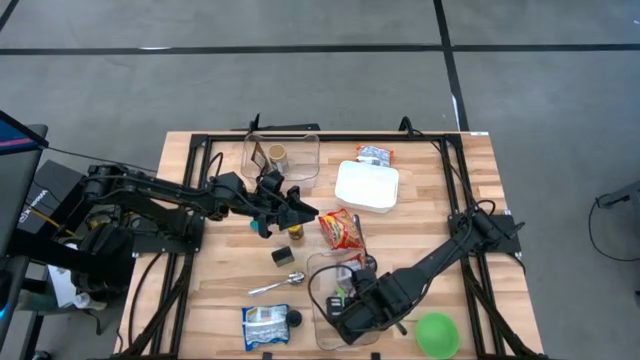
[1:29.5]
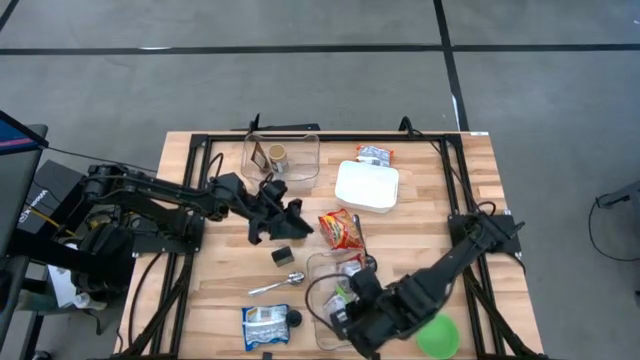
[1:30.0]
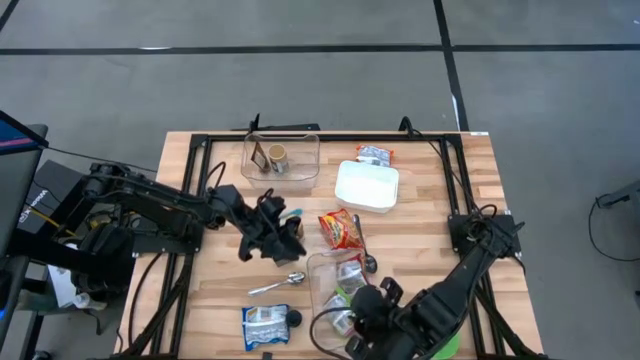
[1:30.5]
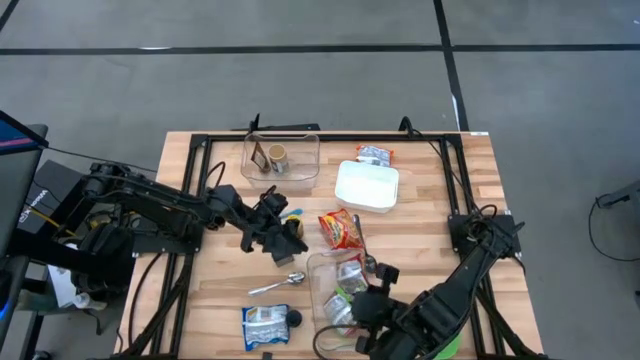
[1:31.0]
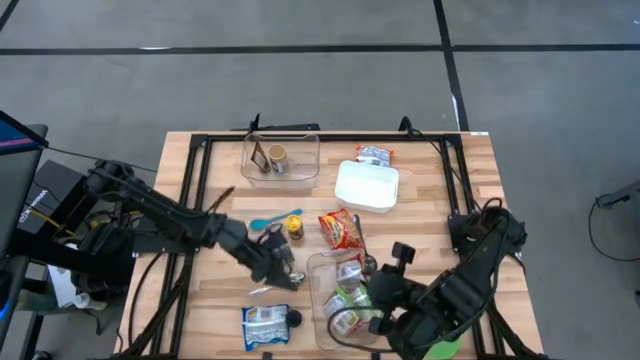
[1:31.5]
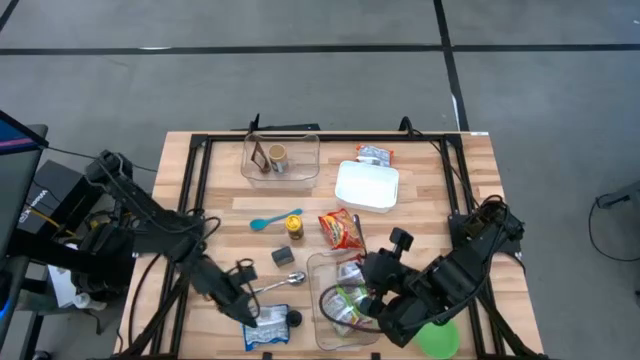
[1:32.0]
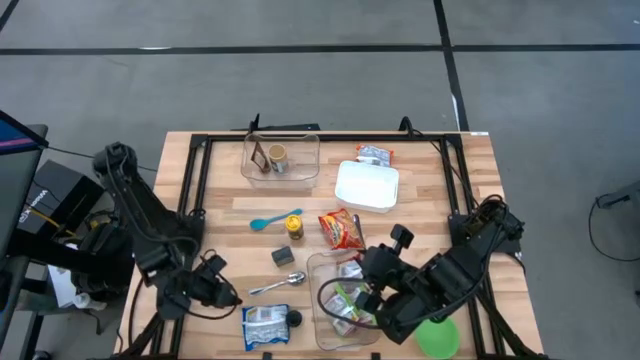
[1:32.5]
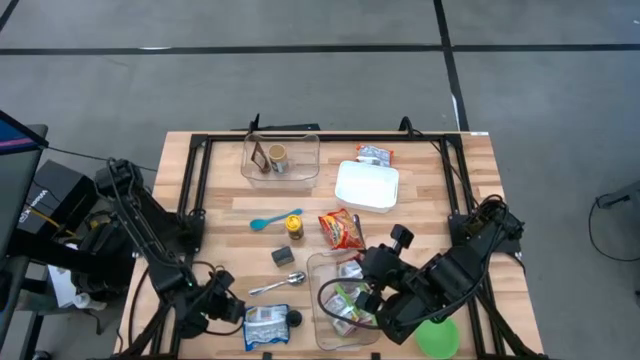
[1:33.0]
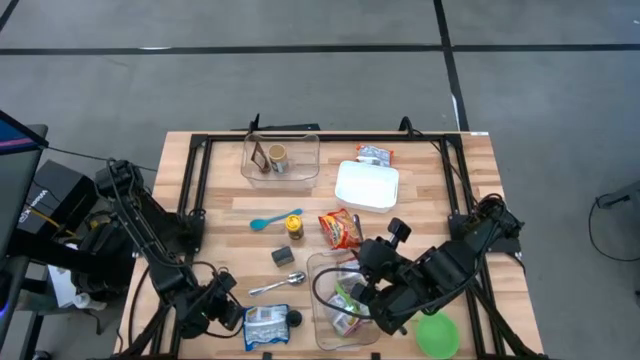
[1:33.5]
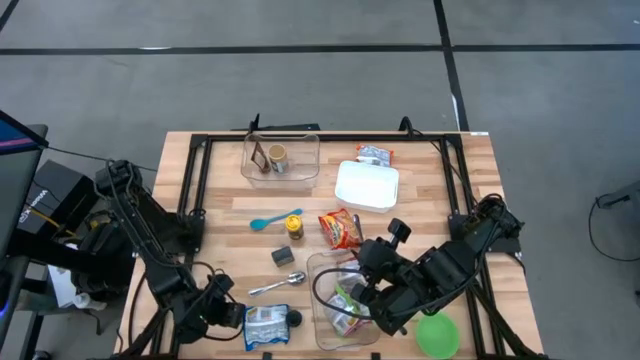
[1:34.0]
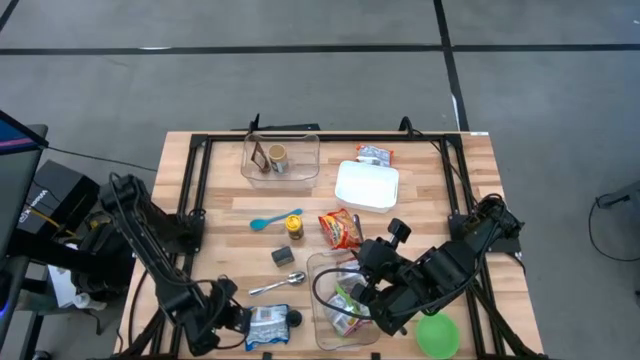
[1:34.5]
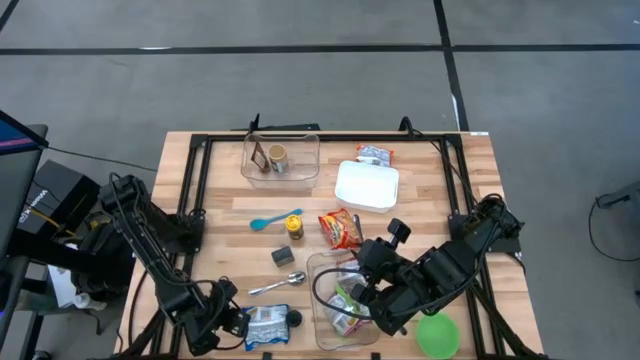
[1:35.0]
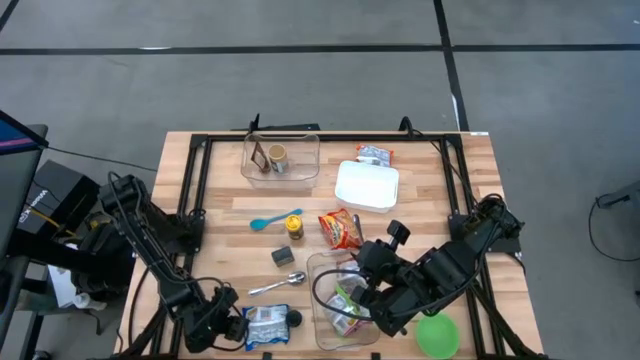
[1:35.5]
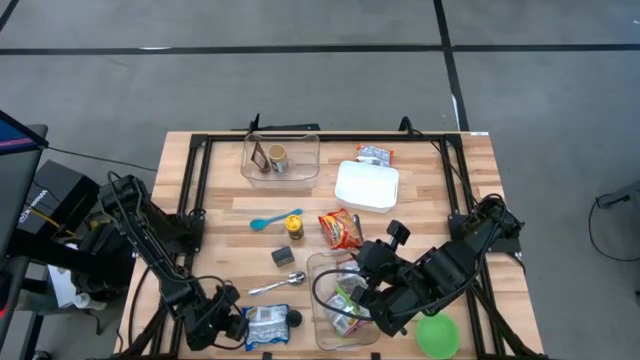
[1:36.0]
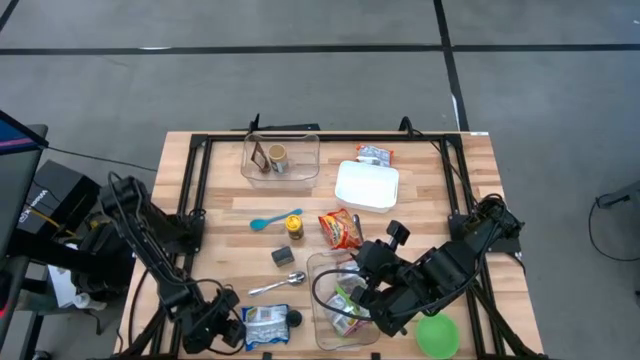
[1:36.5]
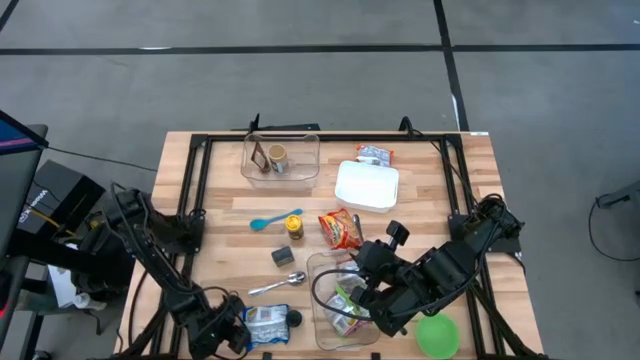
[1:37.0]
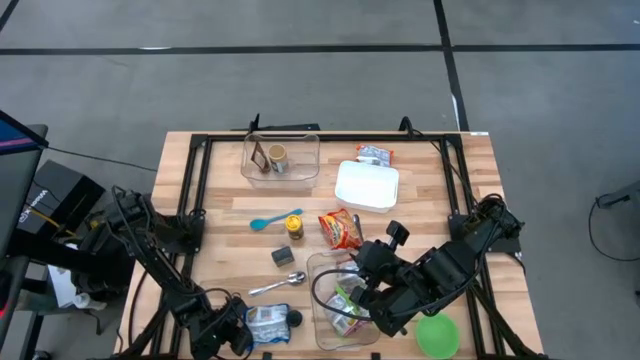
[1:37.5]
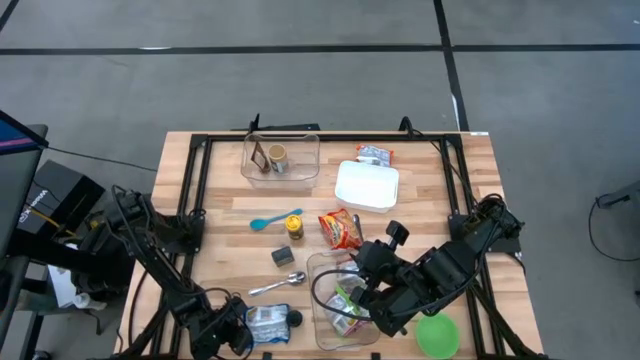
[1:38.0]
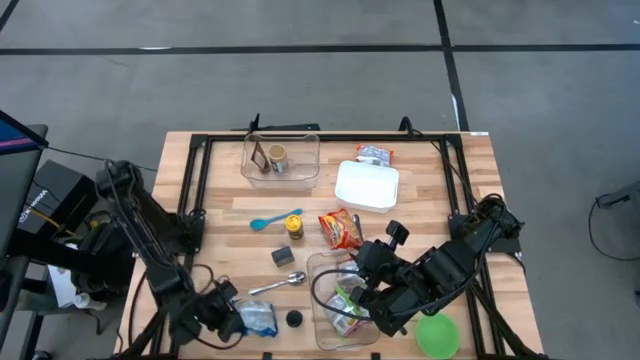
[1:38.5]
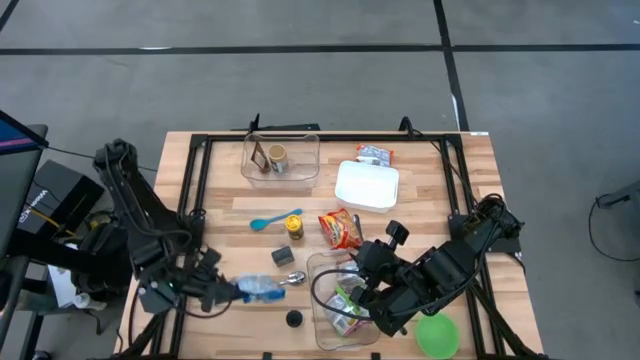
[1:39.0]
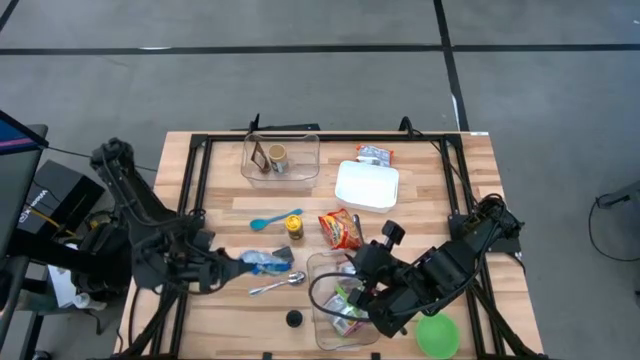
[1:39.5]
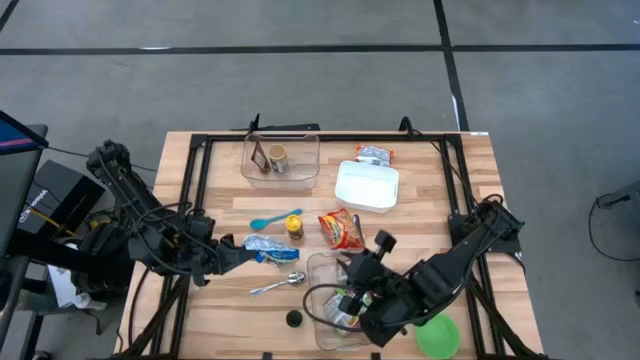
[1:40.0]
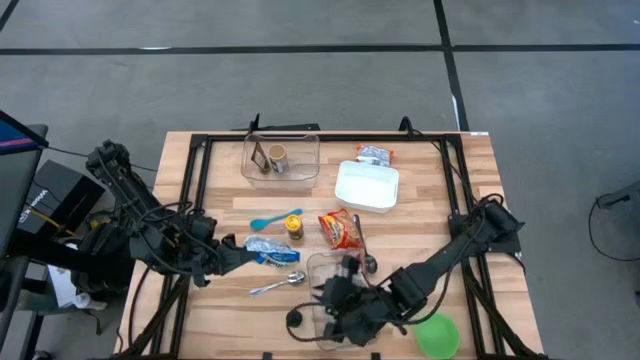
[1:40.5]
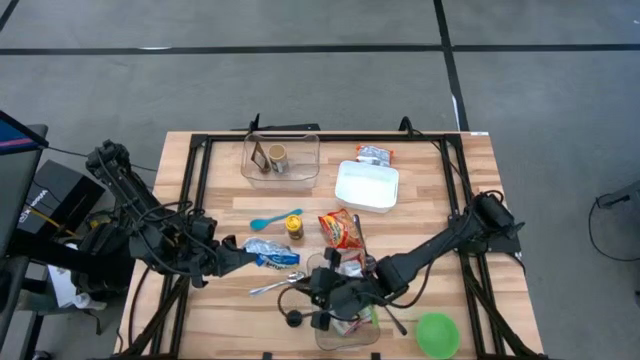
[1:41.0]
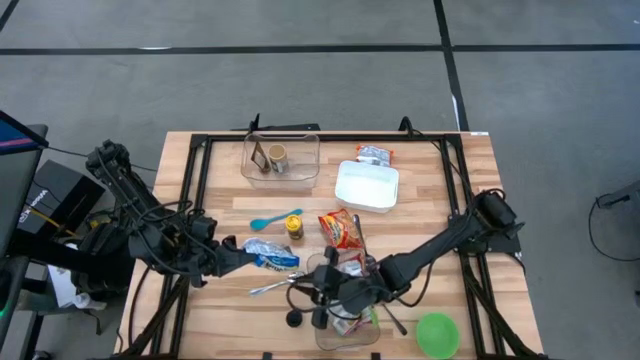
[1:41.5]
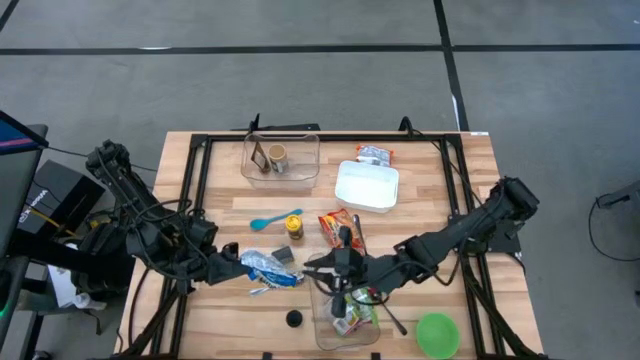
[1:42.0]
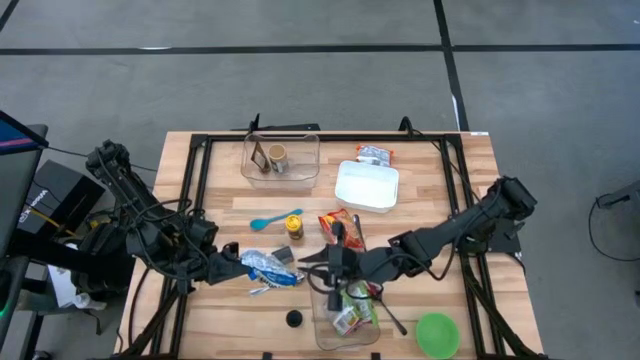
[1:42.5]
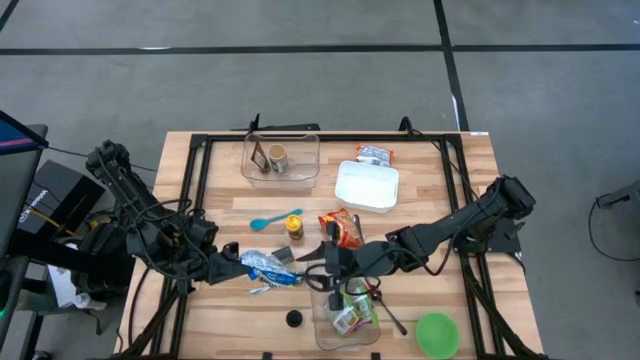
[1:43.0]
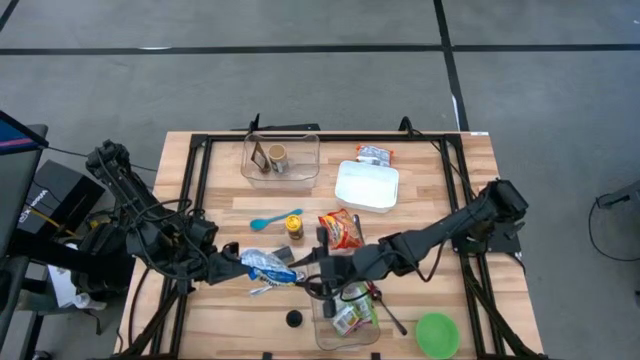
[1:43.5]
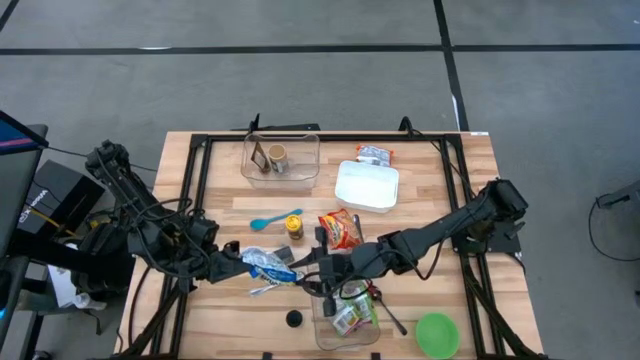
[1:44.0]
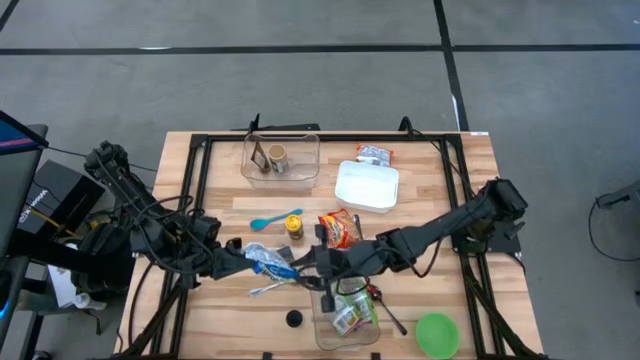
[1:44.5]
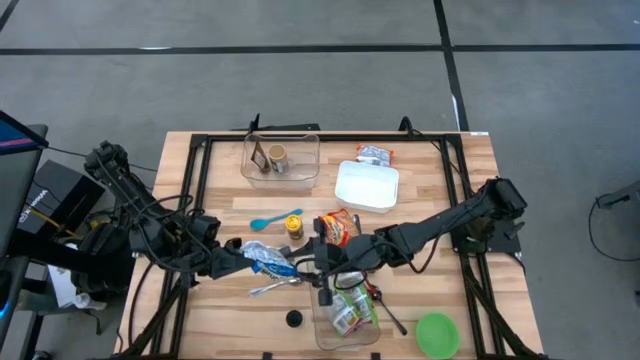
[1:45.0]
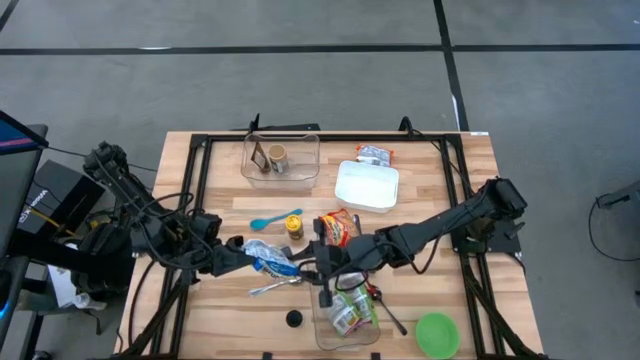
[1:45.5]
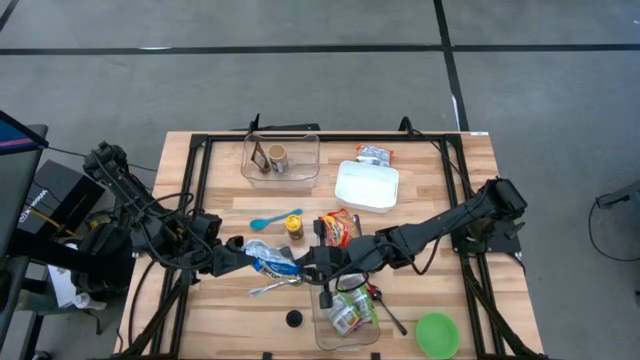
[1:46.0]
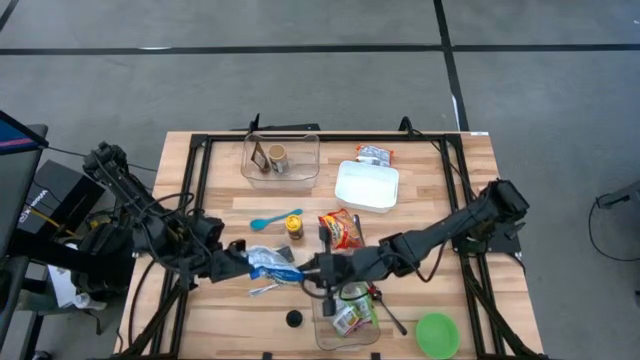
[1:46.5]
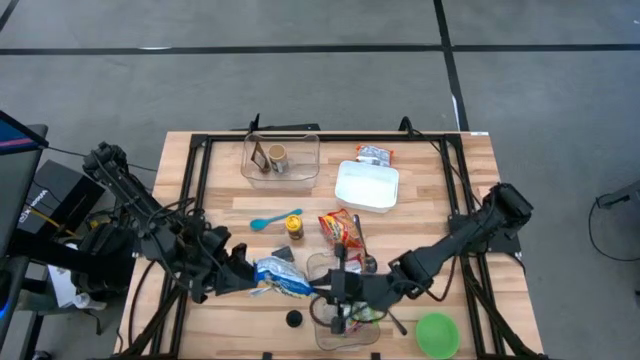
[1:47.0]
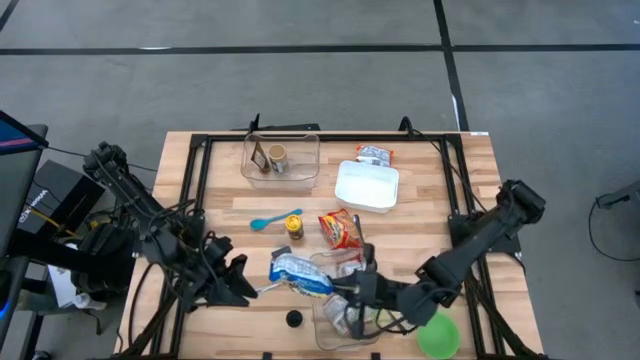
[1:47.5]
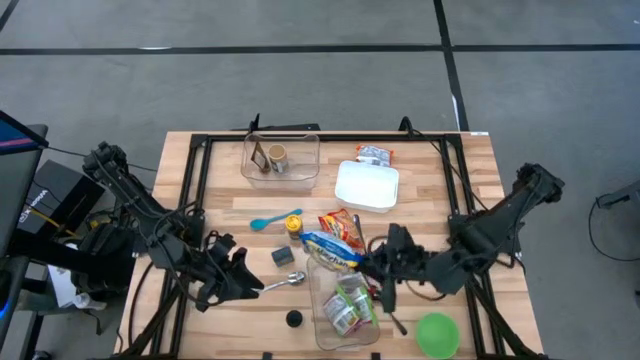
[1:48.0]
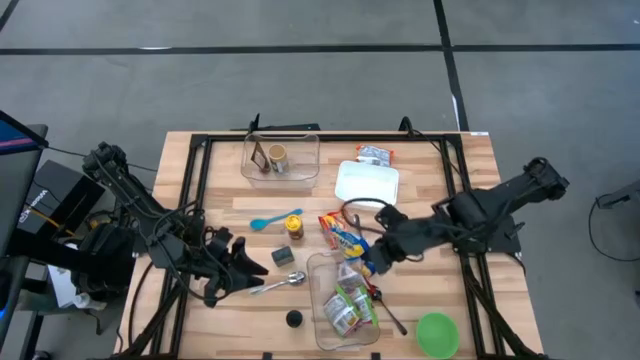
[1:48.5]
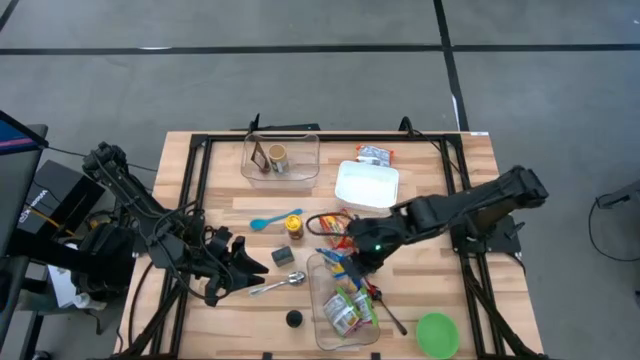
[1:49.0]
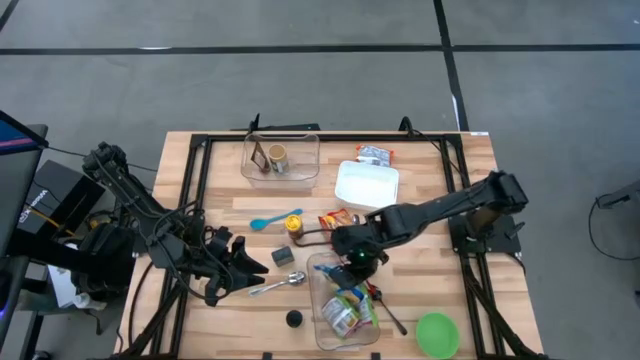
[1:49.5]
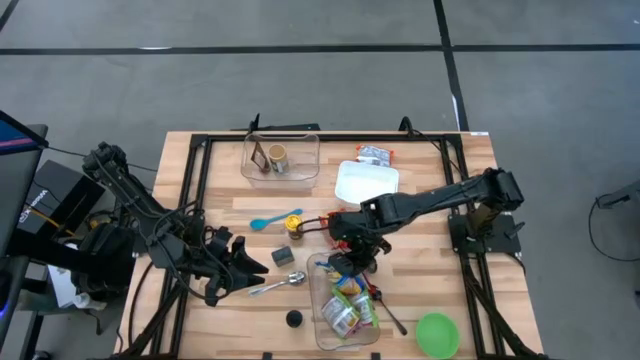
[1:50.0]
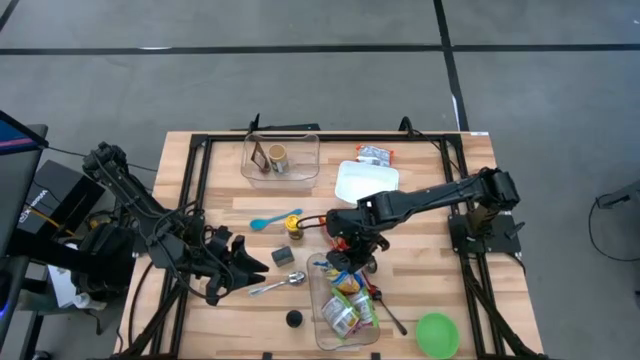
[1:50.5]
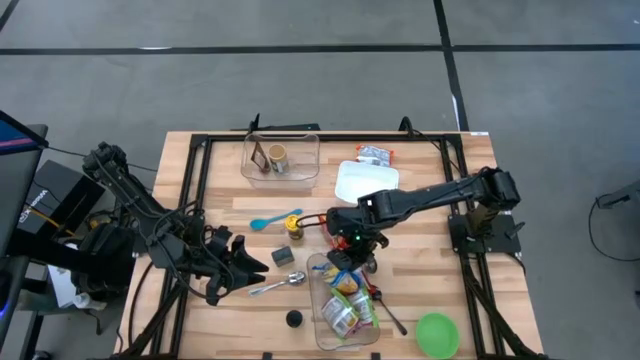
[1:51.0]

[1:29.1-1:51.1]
Task: Pick & Place Food Item
Put the blue noodle pack into the bottom transparent bin
